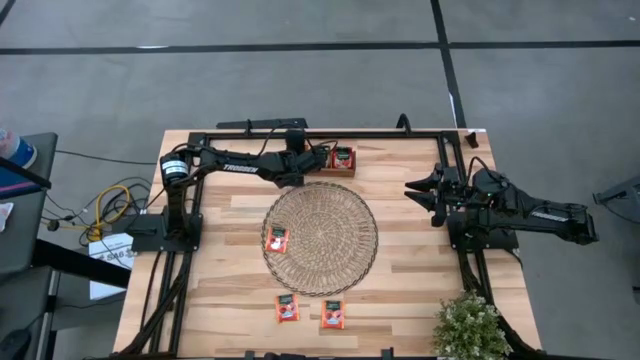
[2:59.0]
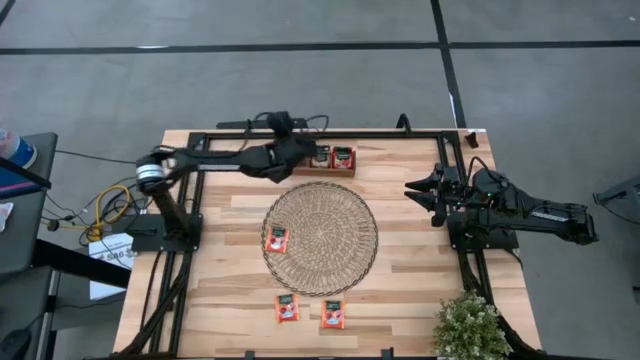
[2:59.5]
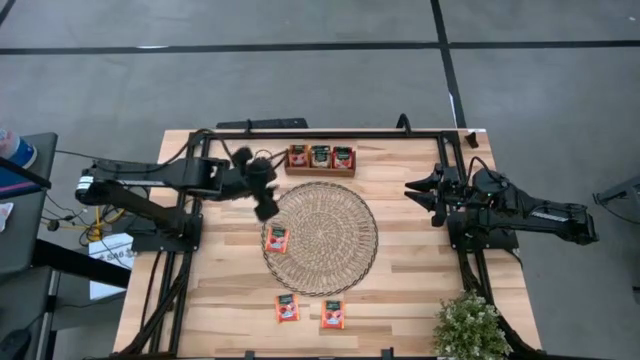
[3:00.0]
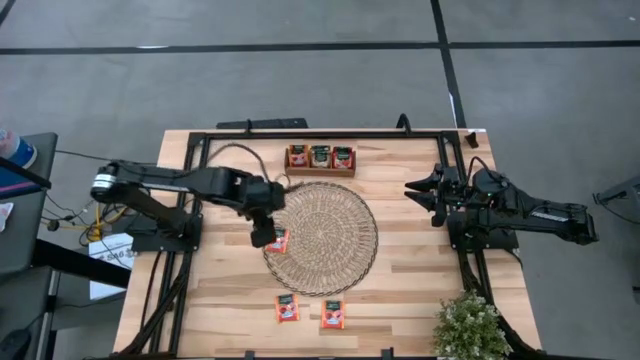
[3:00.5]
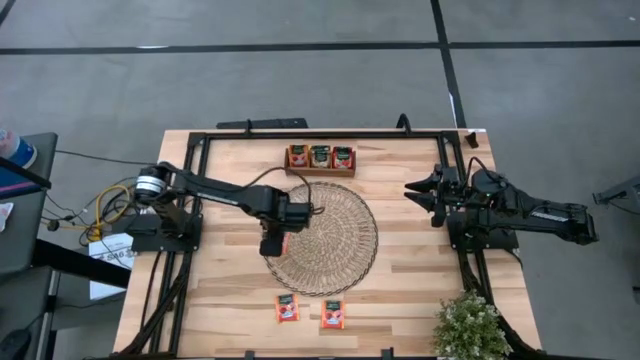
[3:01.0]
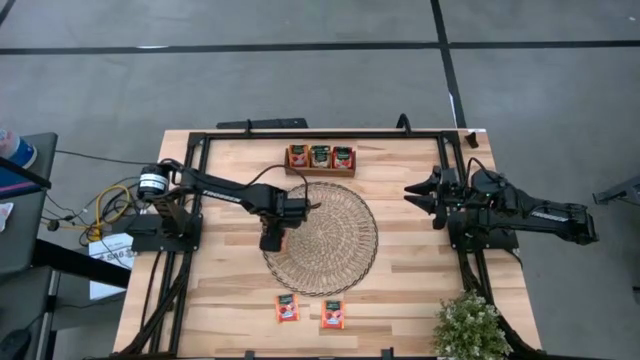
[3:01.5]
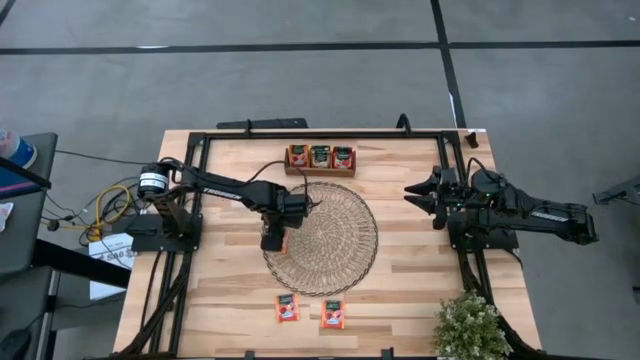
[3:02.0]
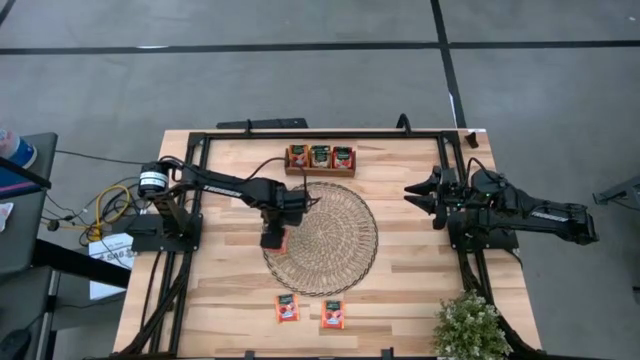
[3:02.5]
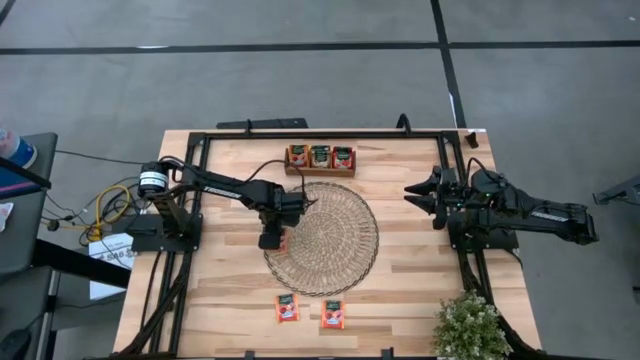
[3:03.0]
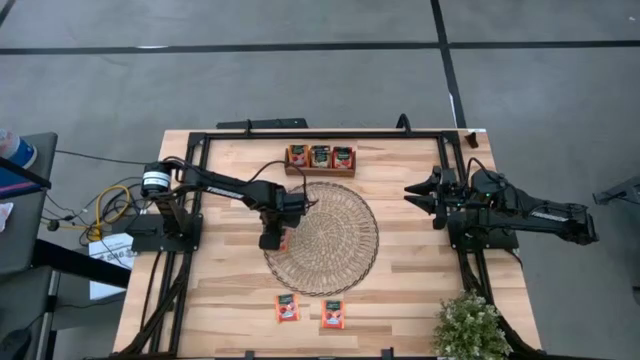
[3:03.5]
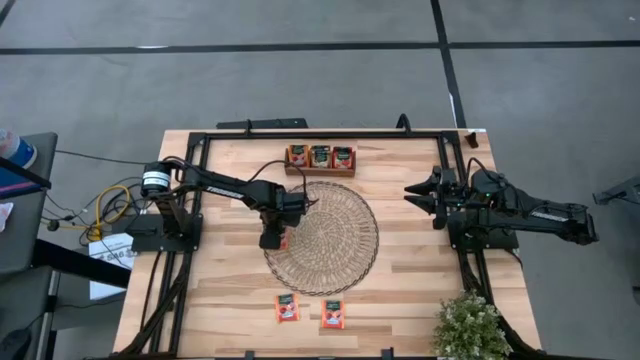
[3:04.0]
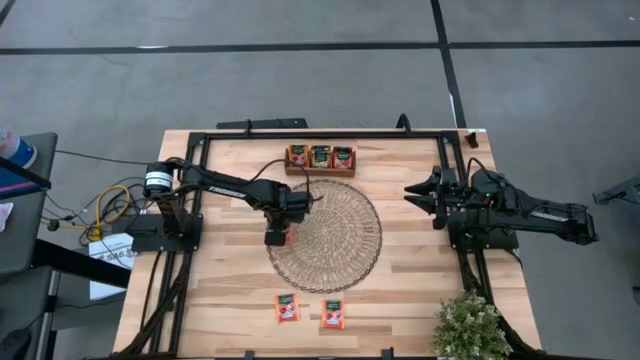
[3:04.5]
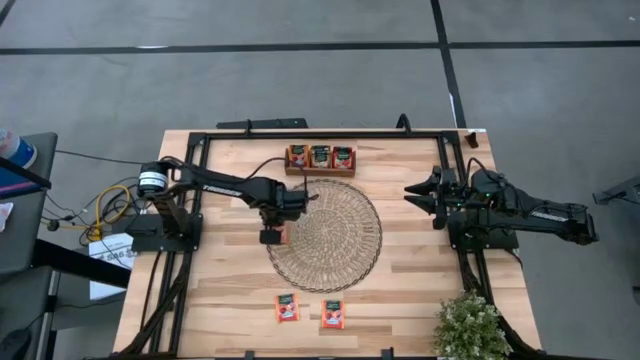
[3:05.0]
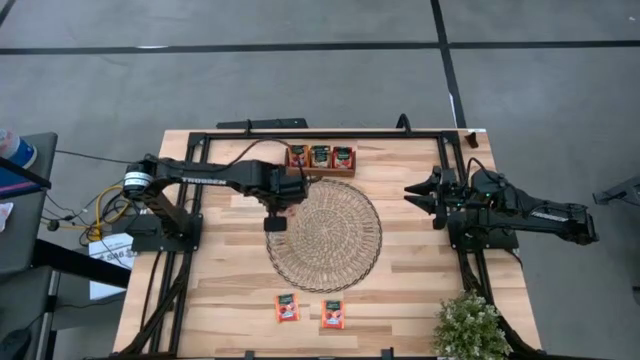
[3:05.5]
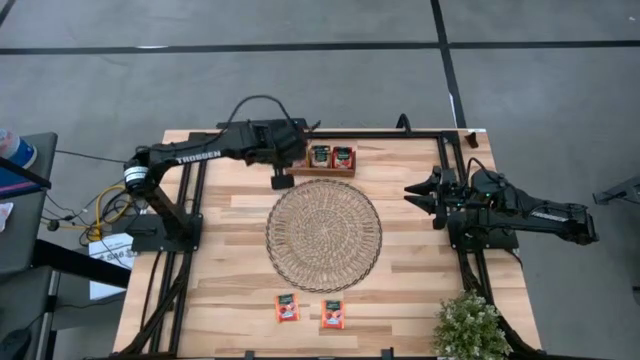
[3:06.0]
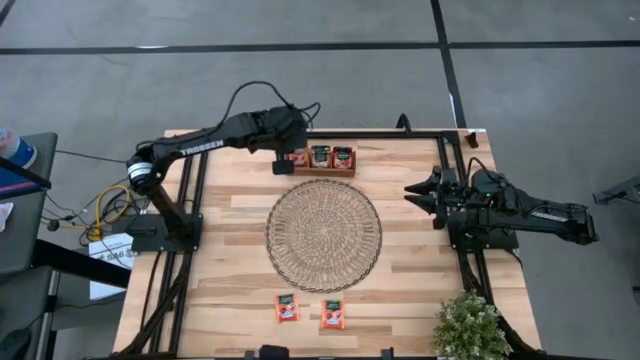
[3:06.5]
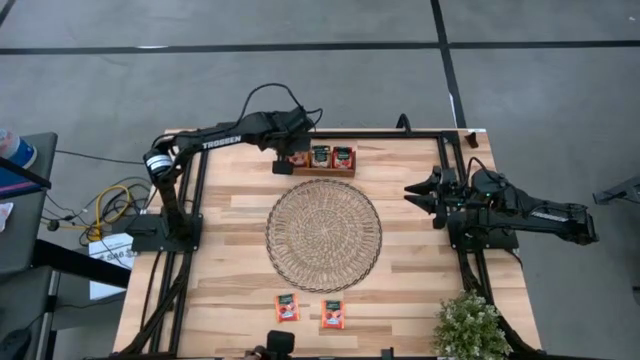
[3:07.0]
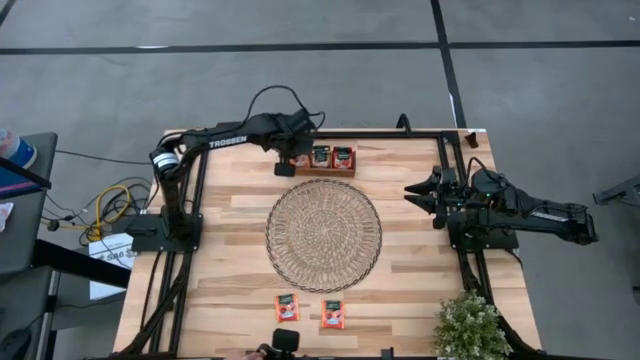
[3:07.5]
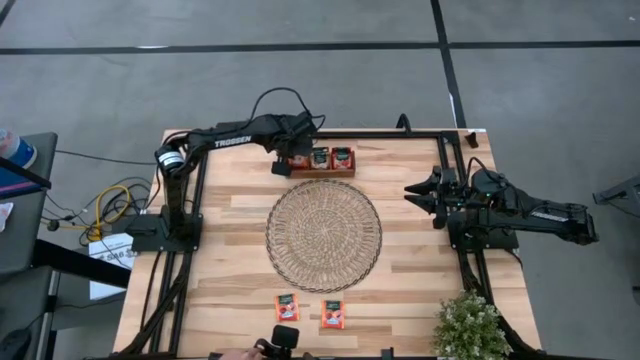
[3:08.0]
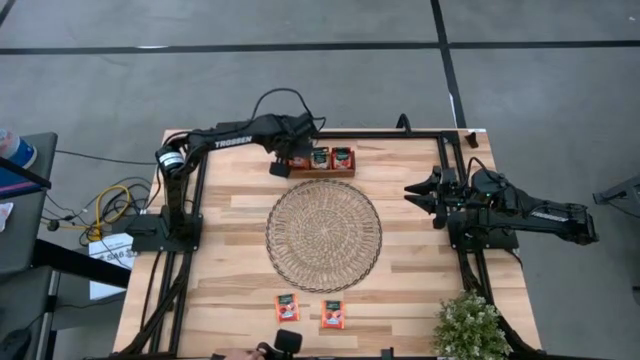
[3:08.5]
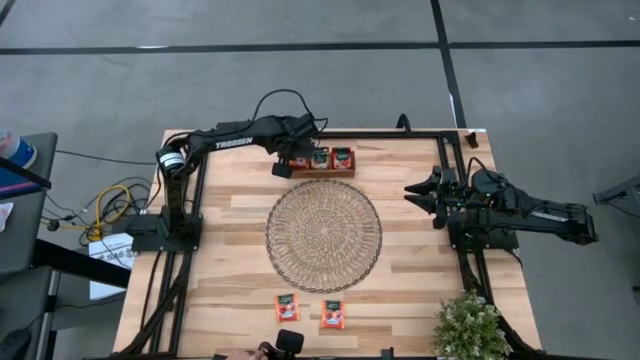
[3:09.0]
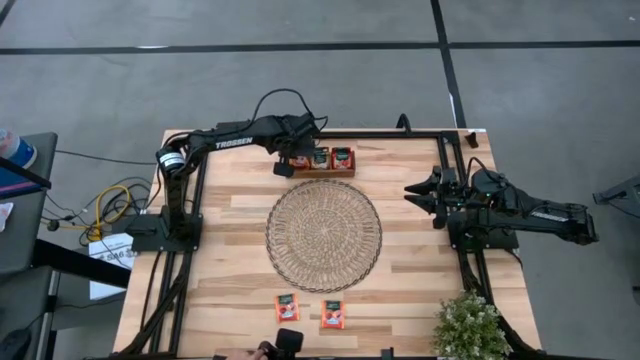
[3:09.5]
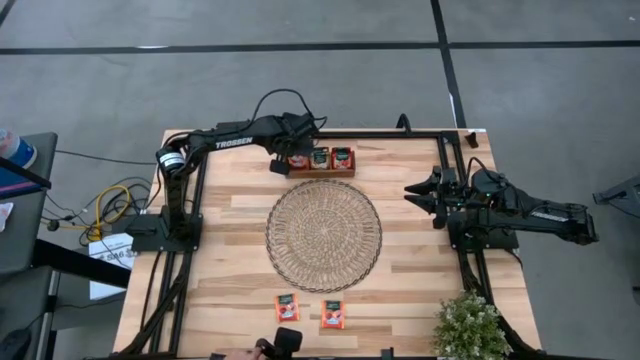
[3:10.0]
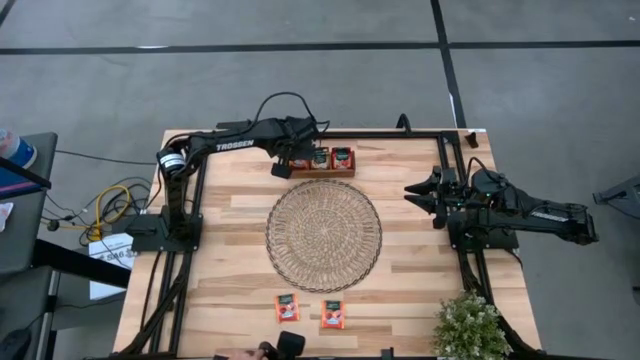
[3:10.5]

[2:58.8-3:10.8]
Task: Pick & Place Tea
Put the orange tea bag into the left section of the wooden organizer

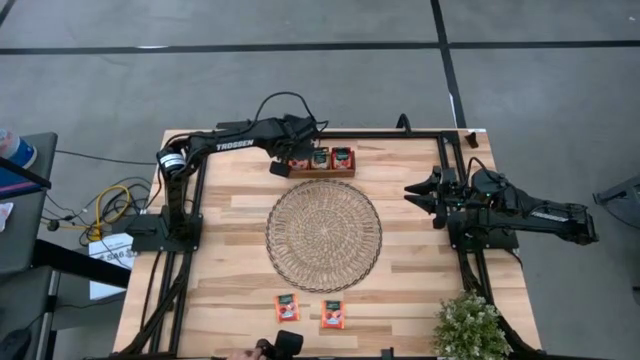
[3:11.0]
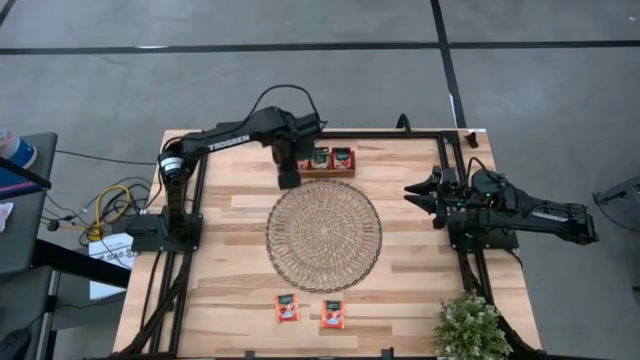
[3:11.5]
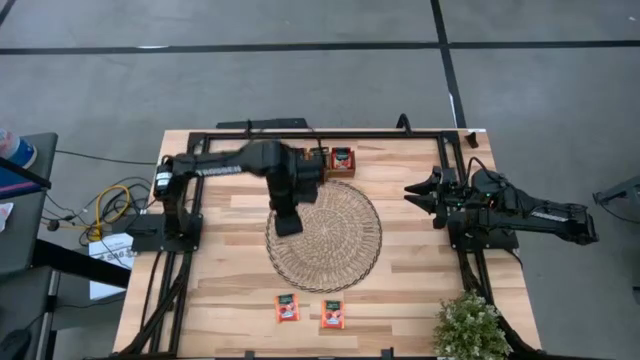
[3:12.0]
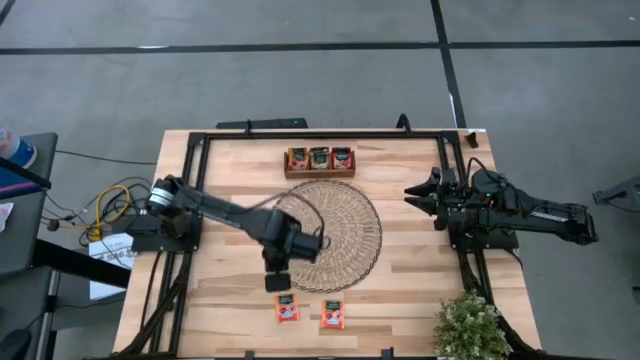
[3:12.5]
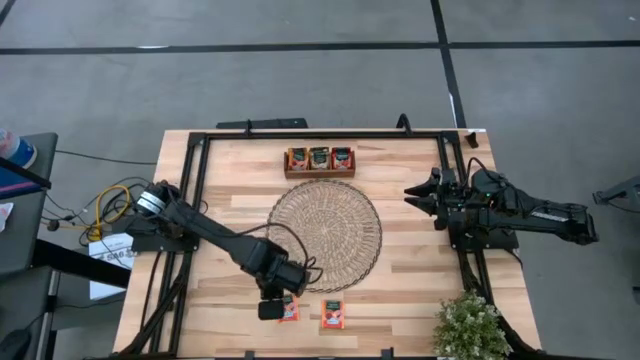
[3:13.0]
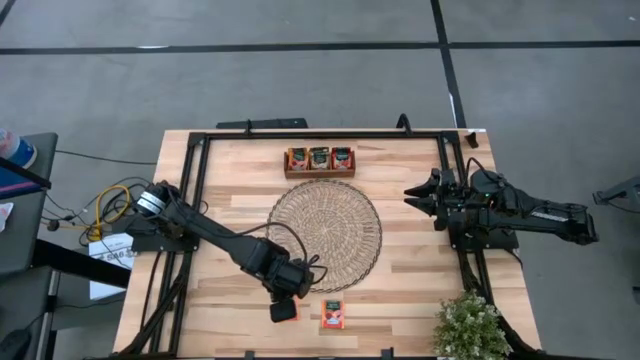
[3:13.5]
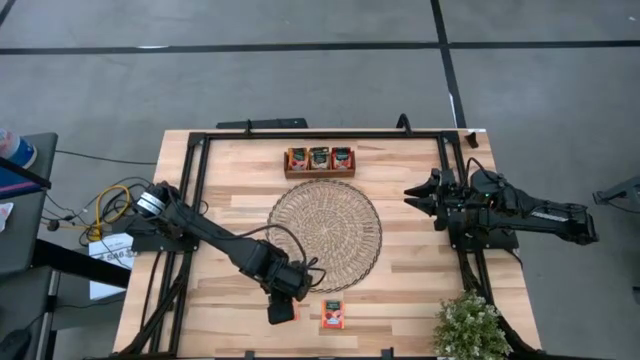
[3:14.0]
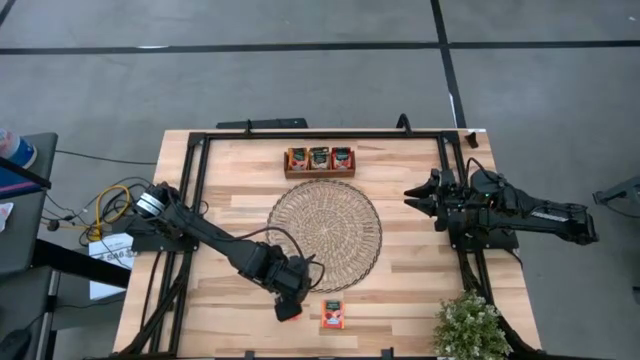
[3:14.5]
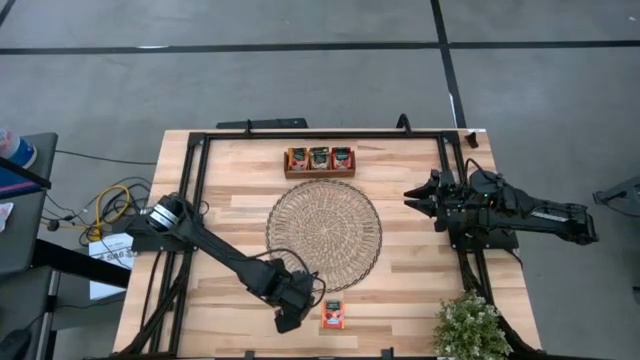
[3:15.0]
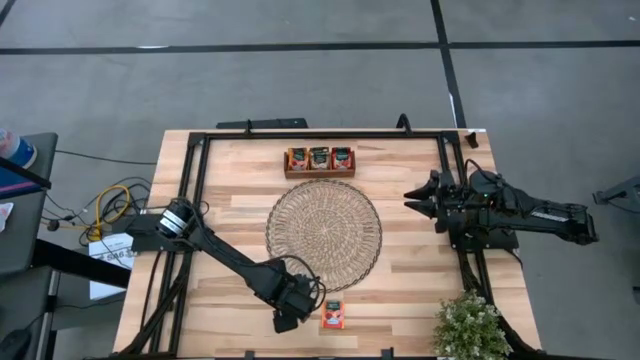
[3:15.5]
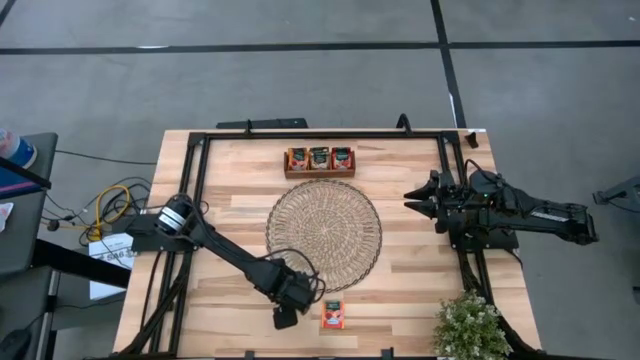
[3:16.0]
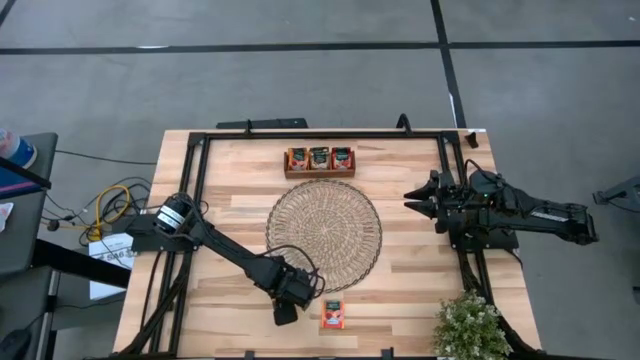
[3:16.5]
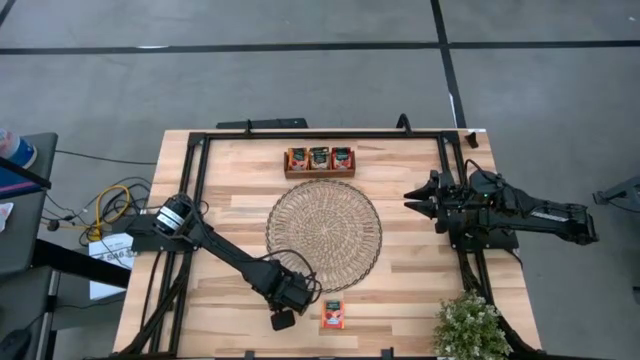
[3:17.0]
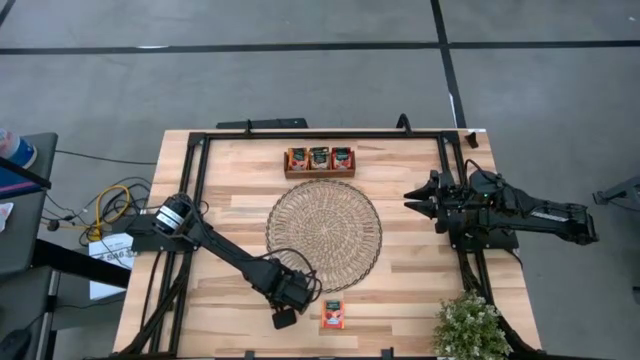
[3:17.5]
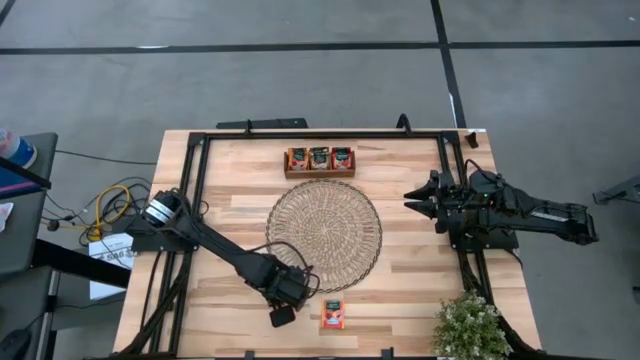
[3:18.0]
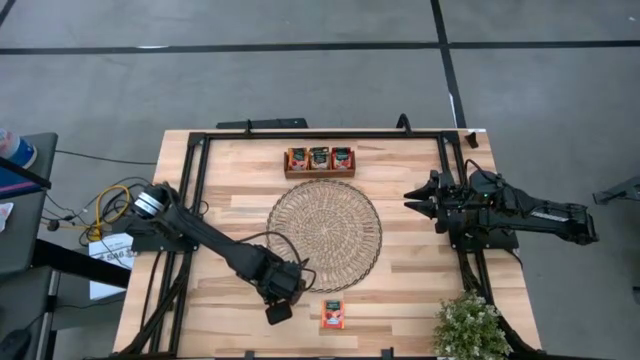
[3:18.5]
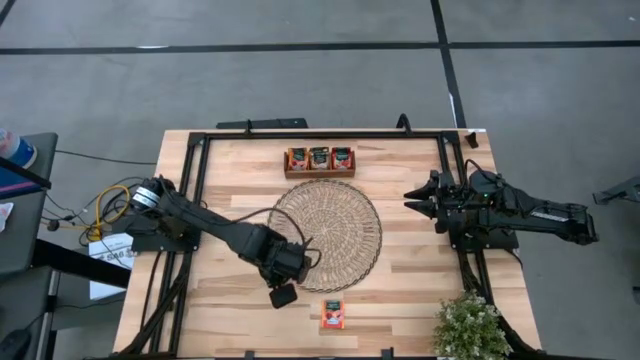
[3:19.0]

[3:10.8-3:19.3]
Put the orange tea bag into the left section of the wooden organizer
